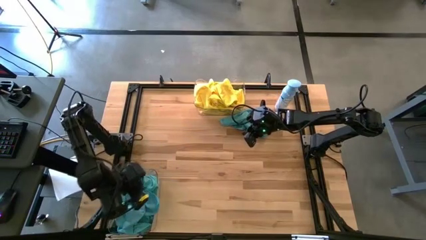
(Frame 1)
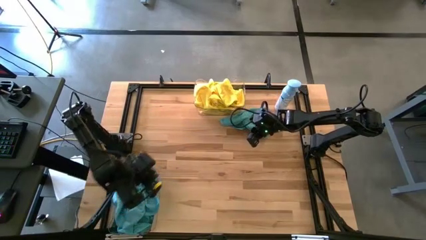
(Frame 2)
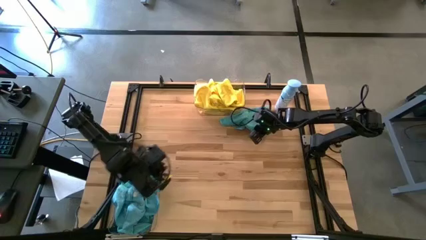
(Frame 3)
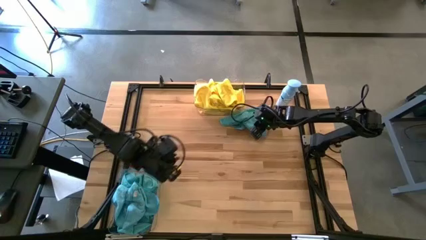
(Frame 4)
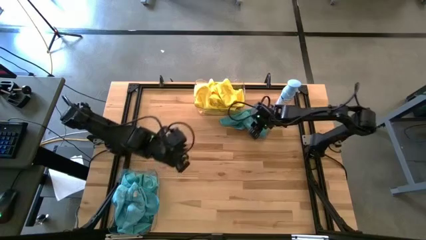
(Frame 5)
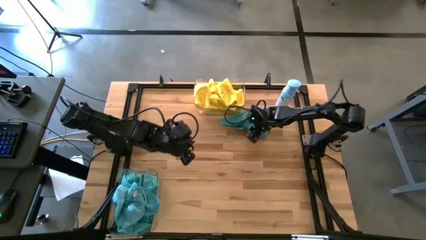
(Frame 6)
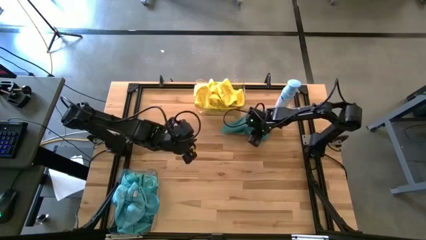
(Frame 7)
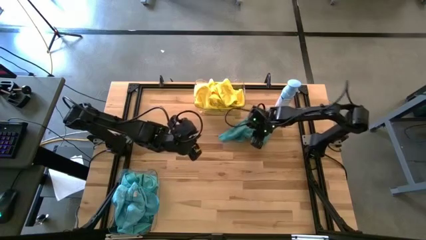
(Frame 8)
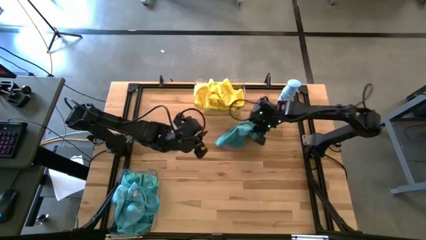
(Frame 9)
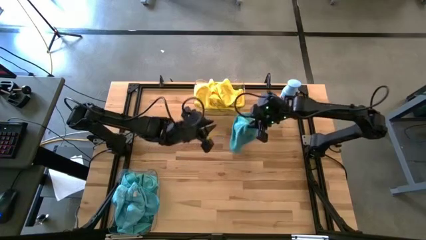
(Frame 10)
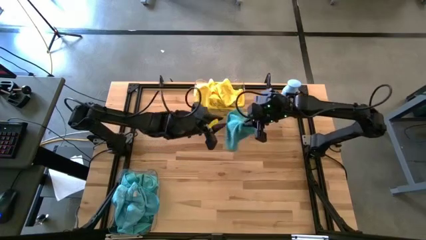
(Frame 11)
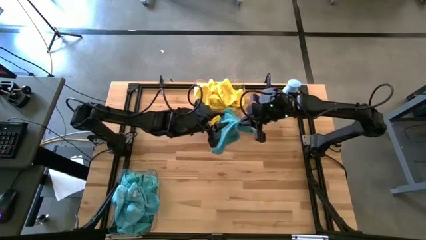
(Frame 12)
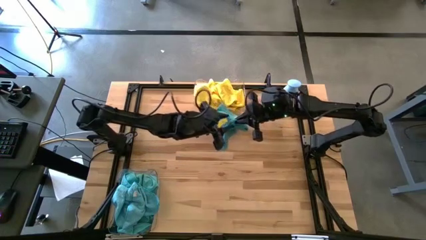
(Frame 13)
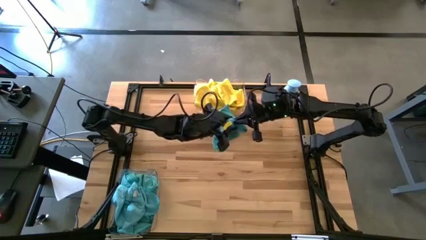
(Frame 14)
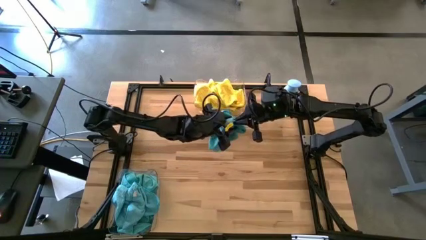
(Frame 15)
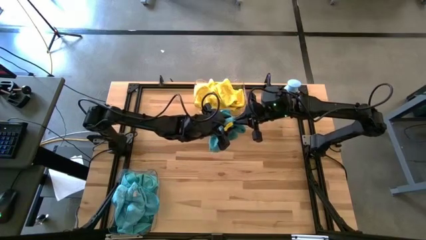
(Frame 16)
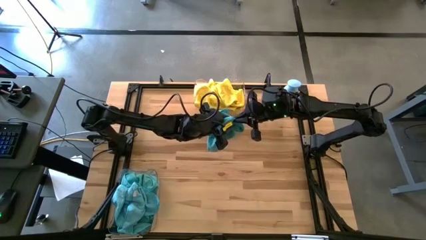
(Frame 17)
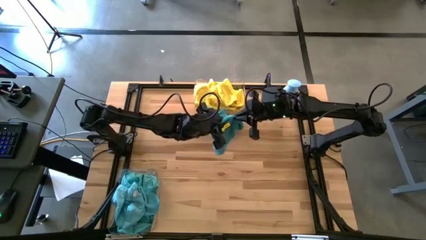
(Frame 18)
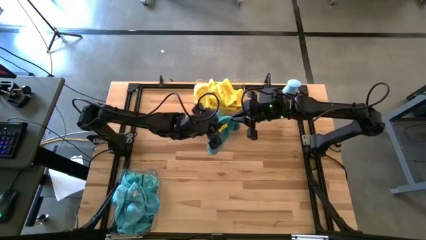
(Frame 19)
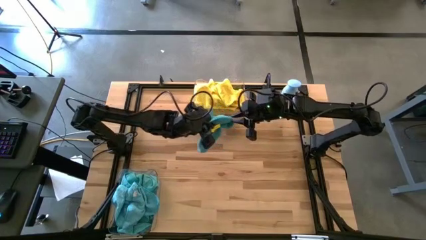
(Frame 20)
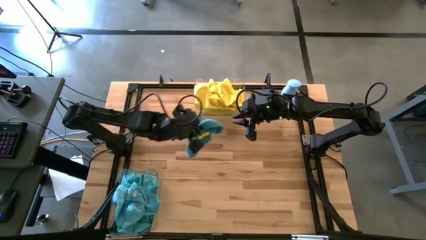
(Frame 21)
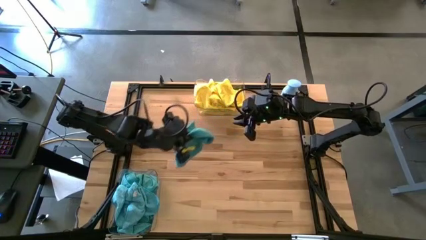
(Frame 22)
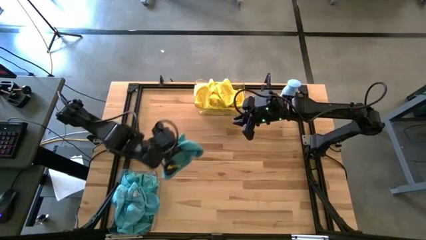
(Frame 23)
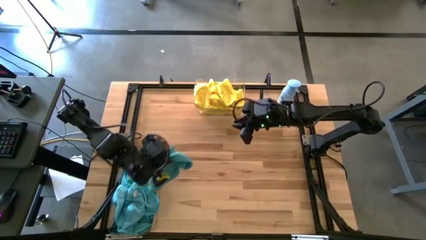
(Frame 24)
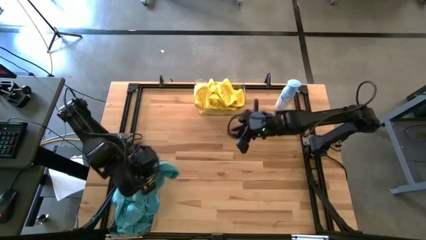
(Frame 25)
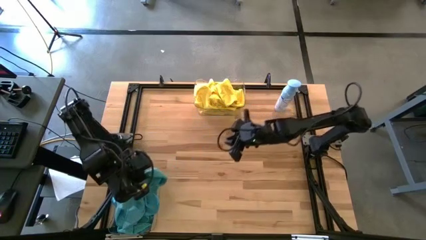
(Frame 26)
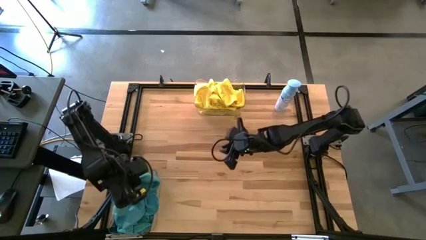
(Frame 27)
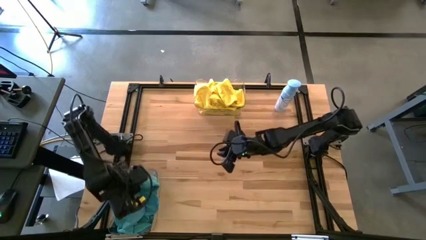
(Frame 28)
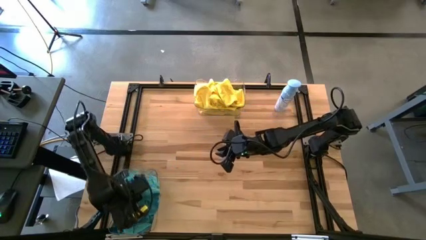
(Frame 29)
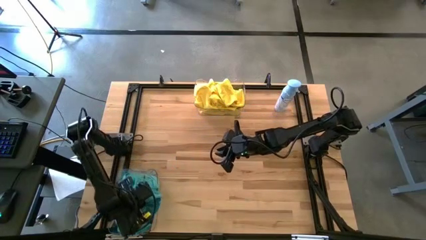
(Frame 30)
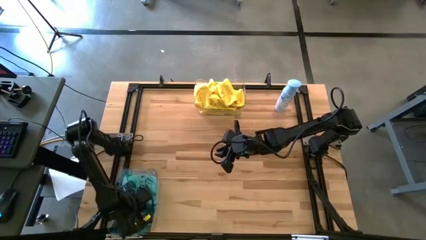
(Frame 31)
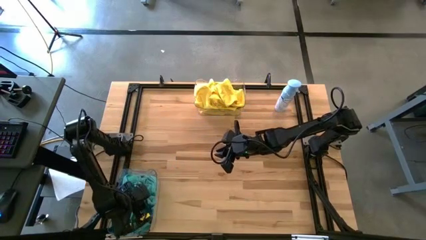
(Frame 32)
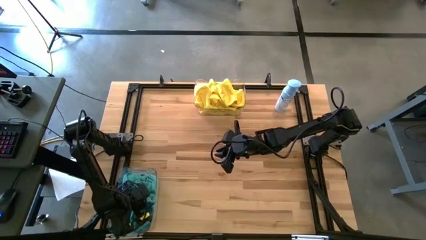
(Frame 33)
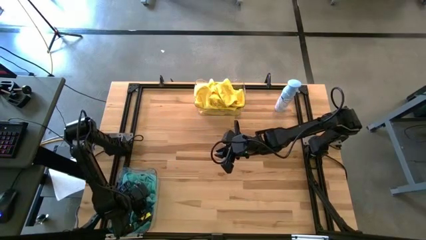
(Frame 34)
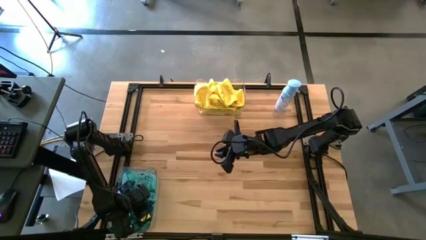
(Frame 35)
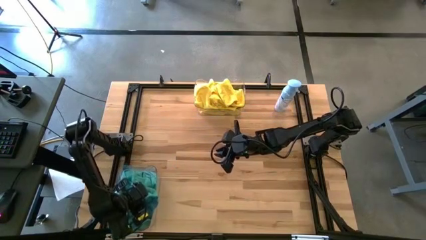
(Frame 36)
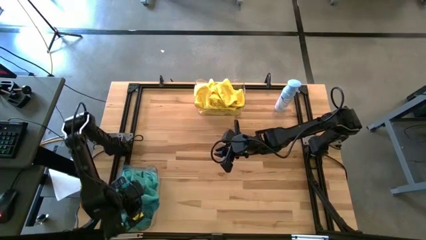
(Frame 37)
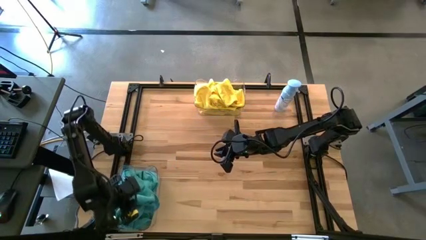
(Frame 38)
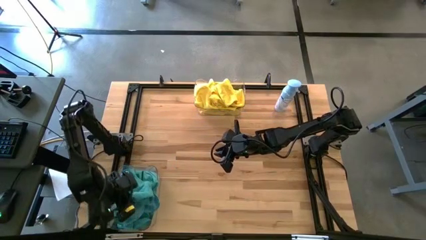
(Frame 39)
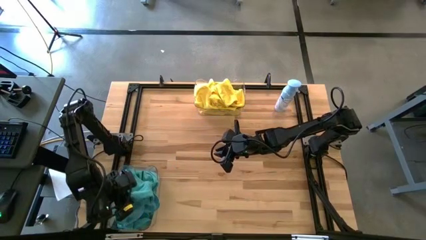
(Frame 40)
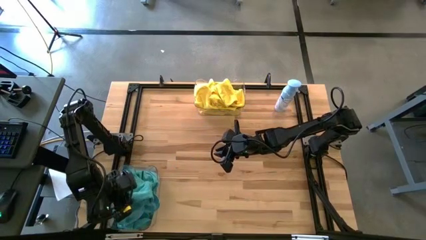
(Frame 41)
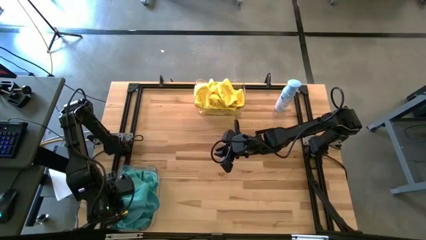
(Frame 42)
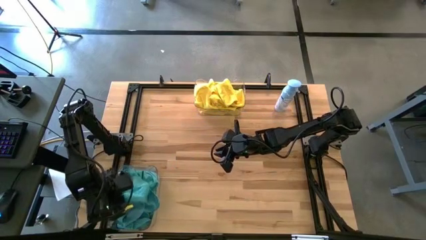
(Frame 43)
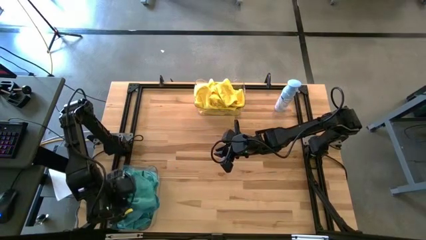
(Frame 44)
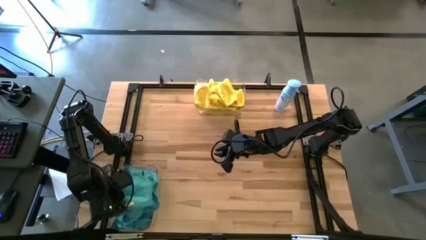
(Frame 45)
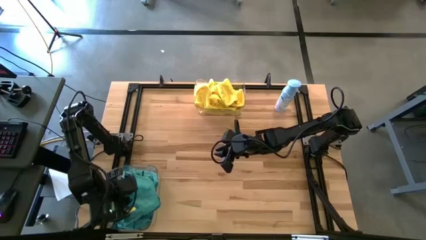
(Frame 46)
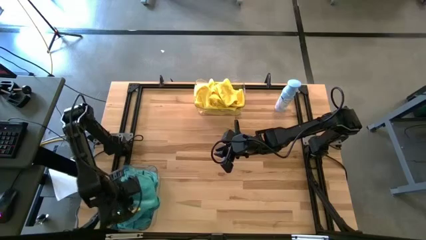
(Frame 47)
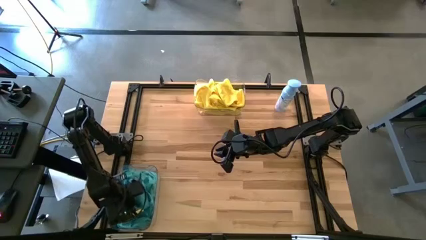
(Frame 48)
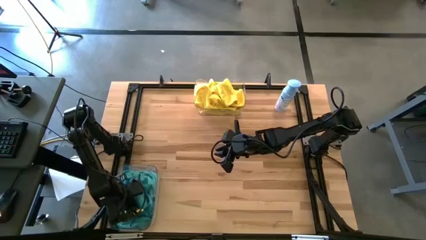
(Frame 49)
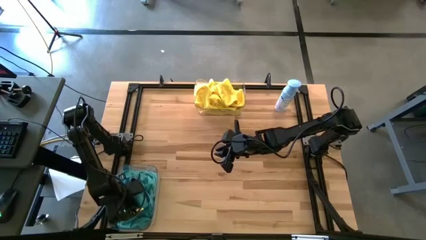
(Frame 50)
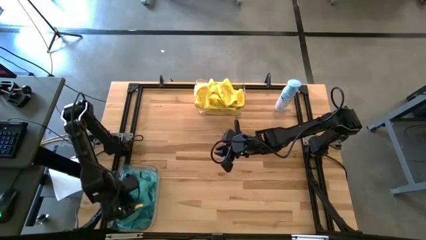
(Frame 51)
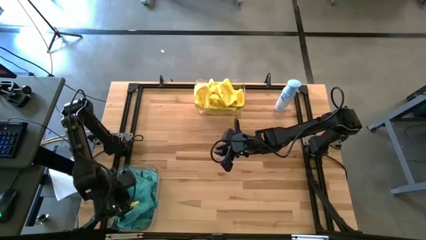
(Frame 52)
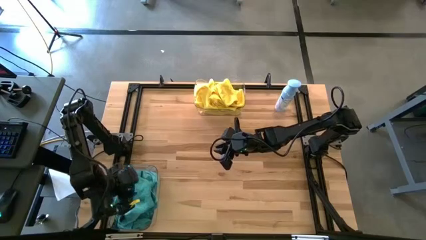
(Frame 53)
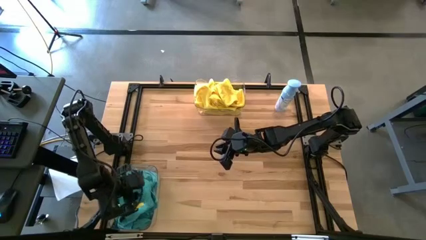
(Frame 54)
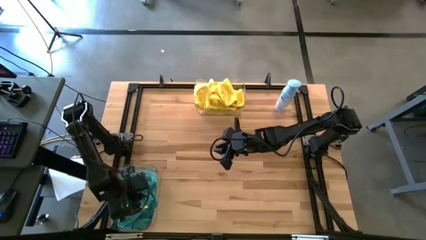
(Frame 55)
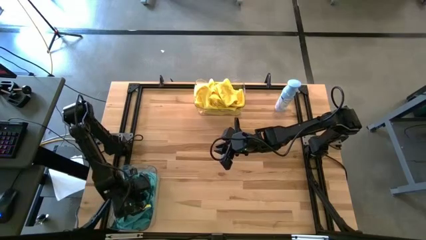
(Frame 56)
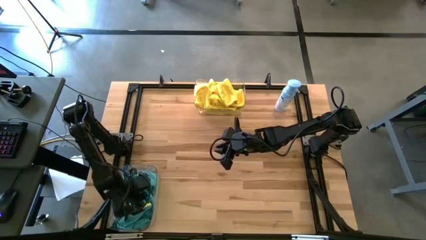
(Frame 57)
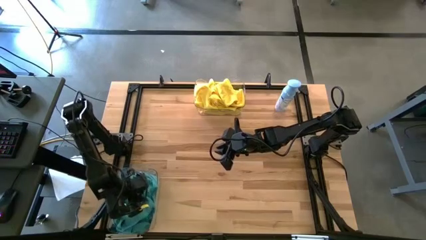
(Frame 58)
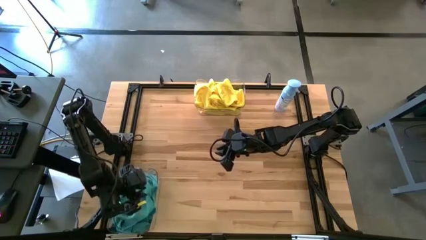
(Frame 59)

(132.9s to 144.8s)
Task: Sort microfiber towel by color & place in baskets
Put the blue microfiber towel into the bottom transparent bin

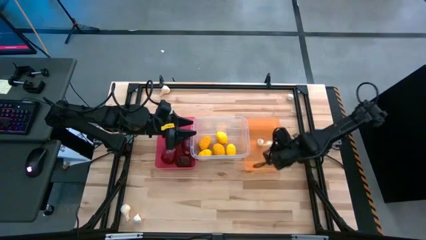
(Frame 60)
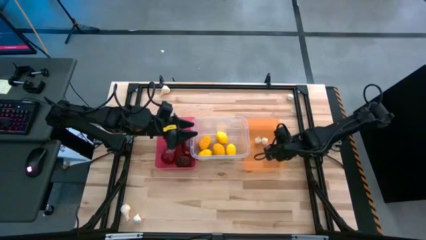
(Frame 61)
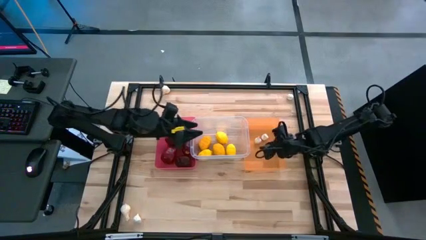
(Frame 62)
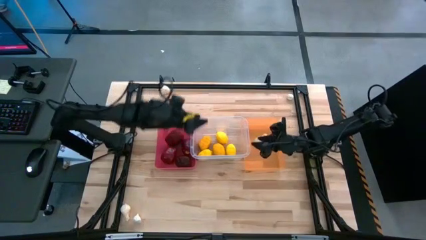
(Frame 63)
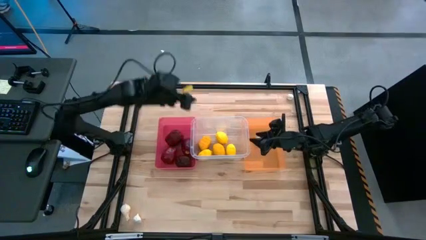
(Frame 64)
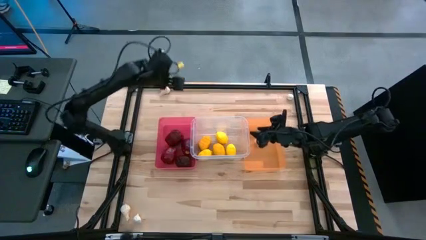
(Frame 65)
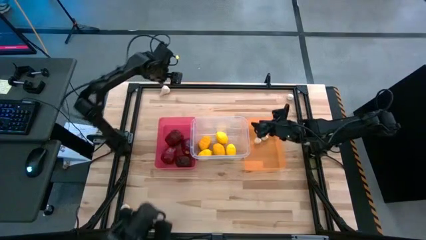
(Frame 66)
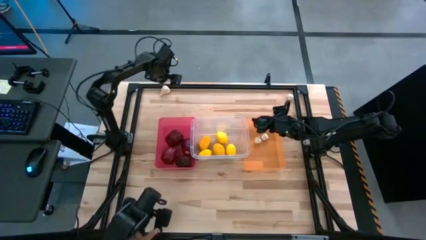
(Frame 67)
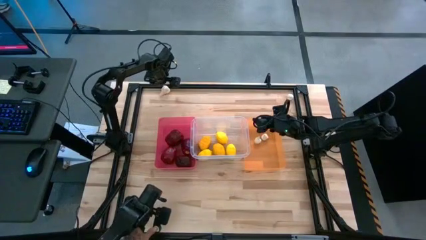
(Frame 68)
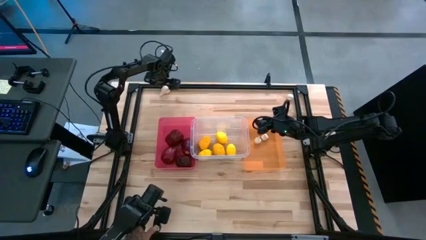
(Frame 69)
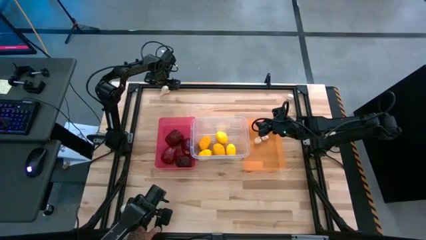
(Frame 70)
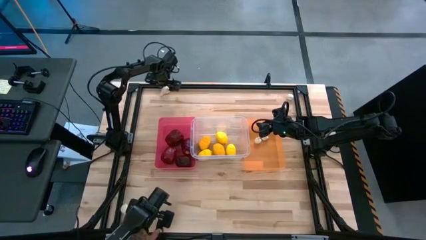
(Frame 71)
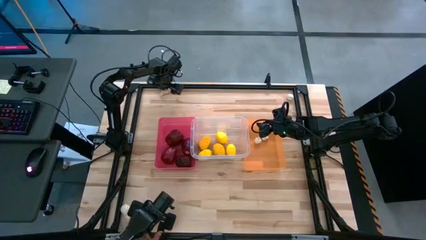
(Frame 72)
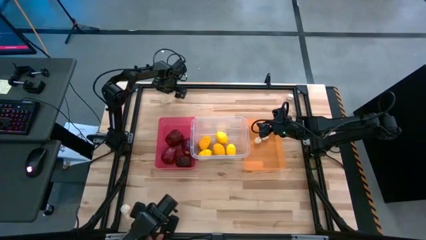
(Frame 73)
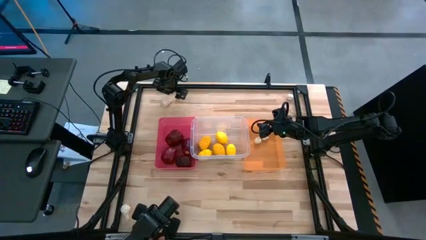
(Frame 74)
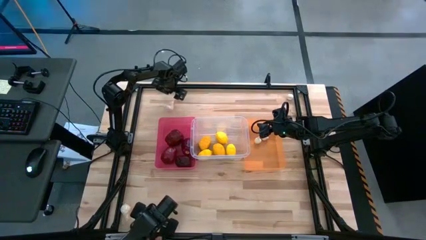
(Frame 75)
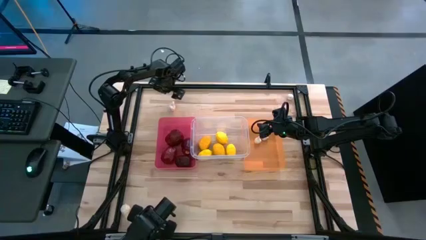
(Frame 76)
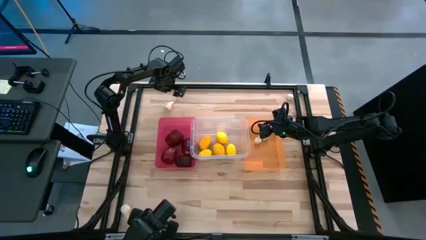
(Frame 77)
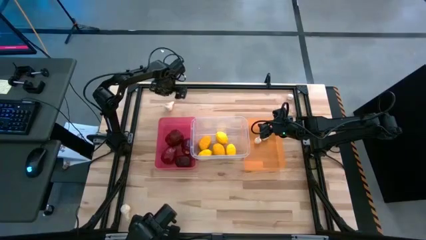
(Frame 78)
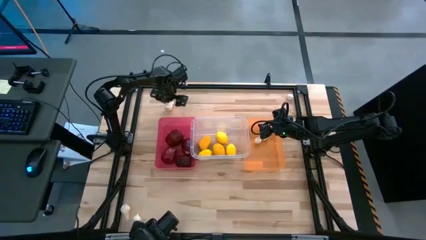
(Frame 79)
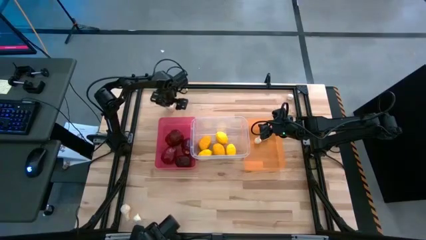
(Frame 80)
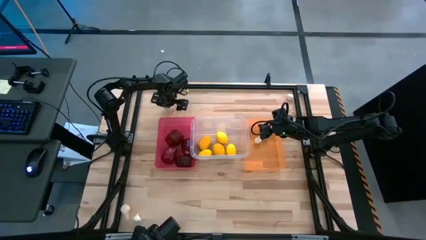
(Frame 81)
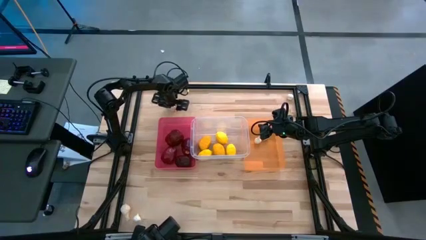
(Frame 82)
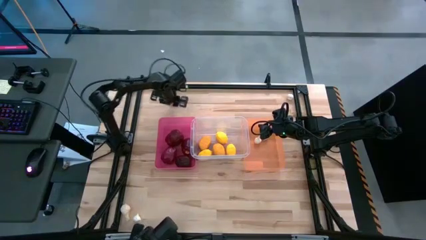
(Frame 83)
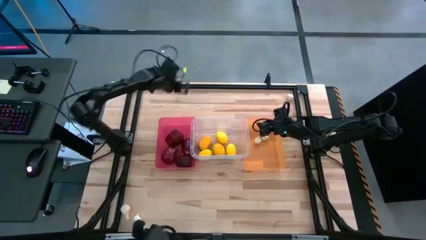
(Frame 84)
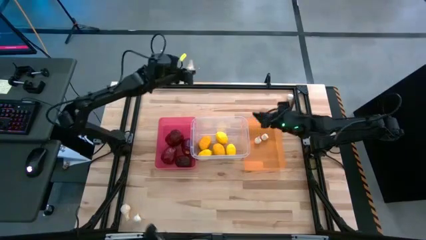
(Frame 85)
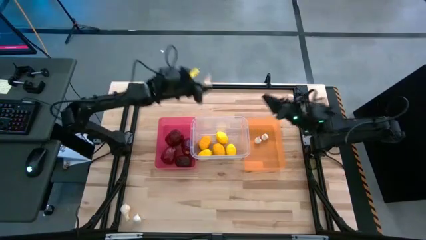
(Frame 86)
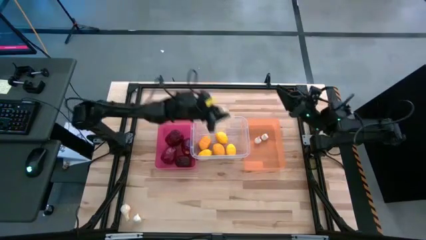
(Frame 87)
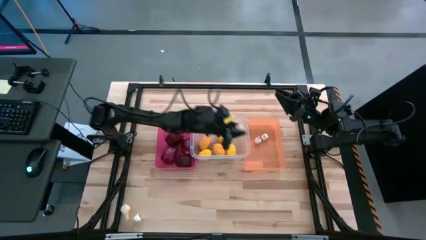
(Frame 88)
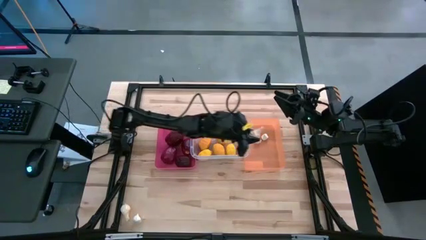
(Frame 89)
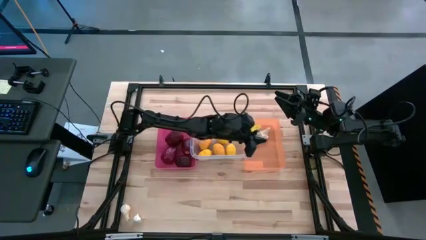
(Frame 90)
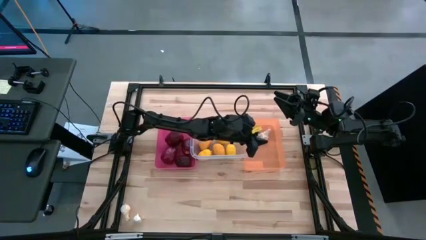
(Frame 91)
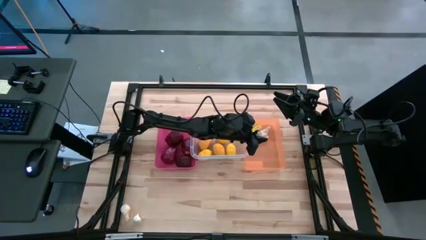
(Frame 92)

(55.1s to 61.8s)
Task: Sort produce into baskets
Put the white garlic into the orange bin
